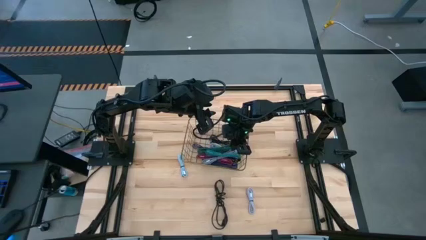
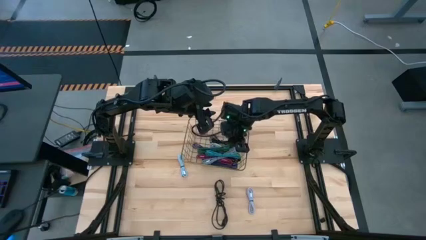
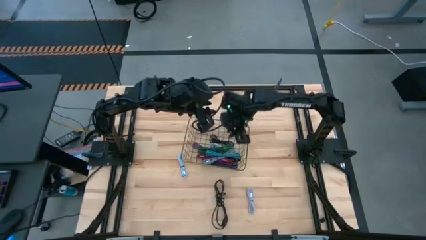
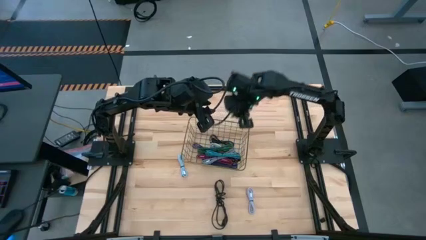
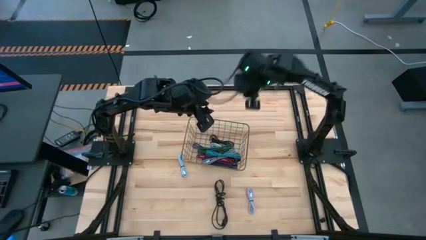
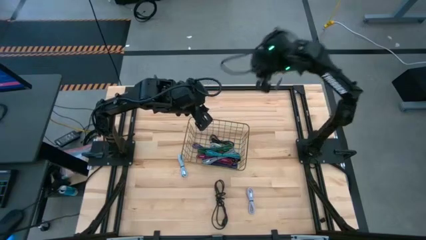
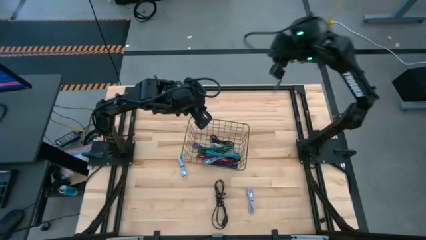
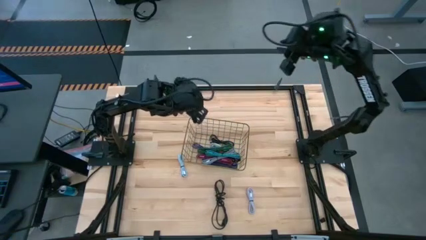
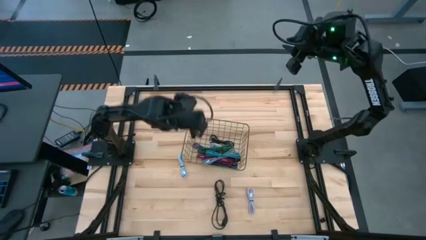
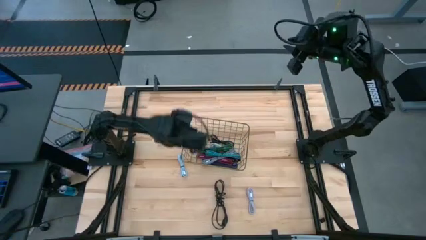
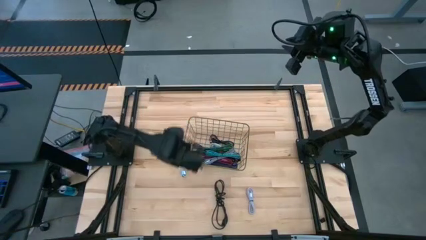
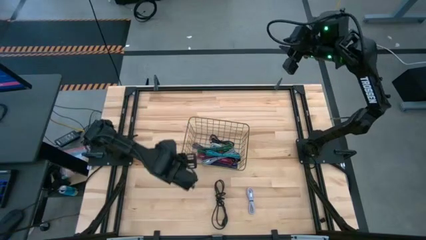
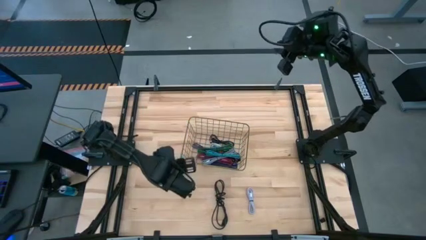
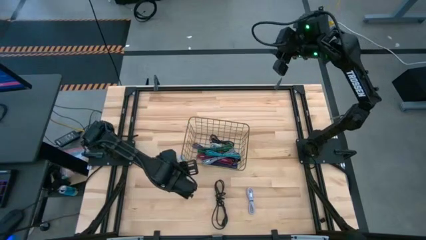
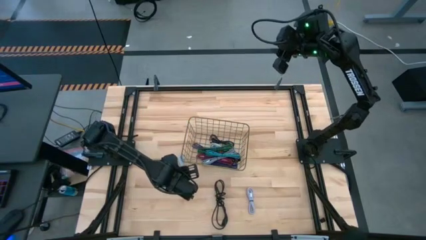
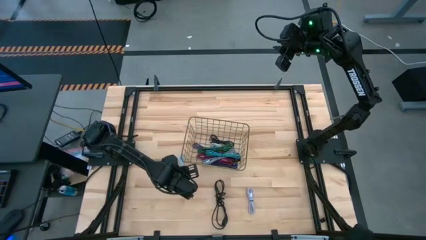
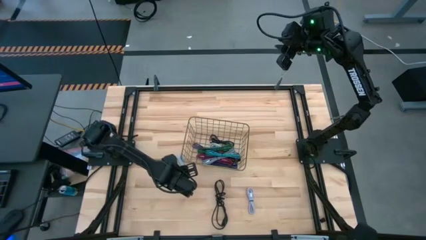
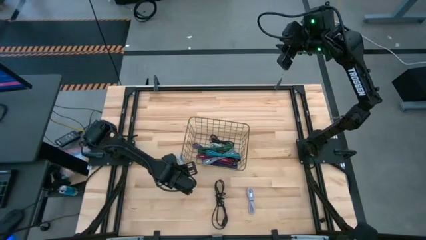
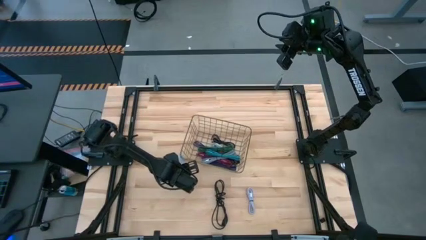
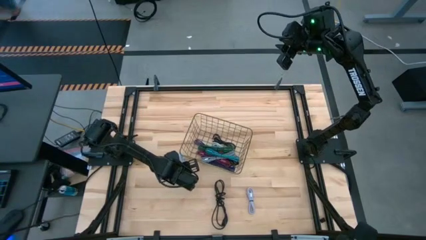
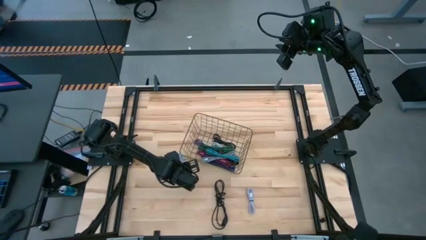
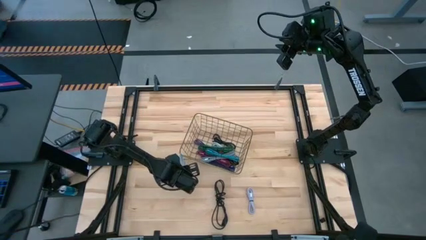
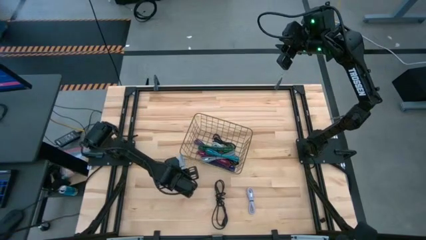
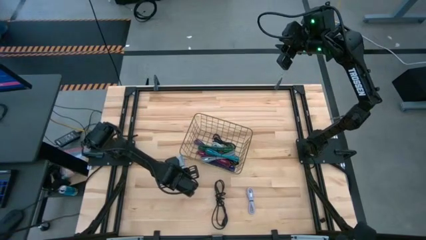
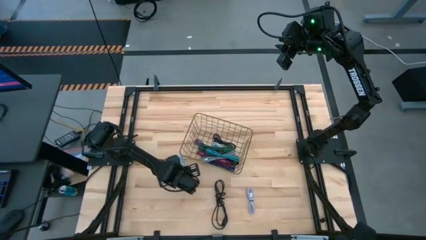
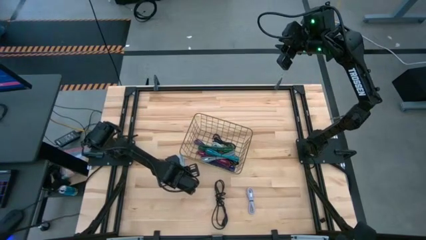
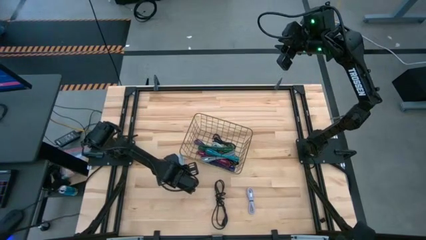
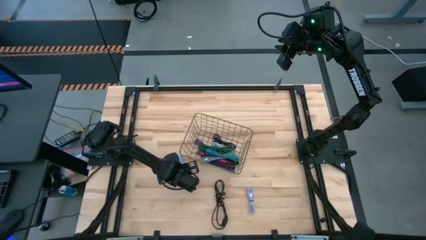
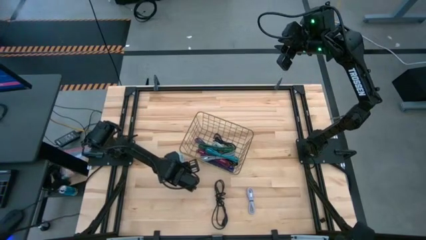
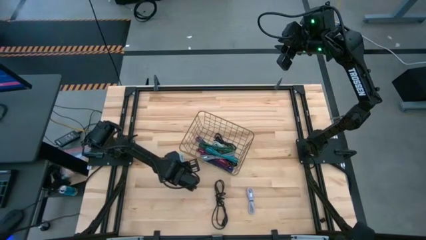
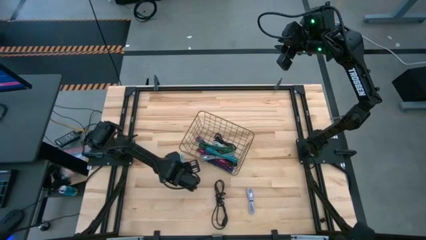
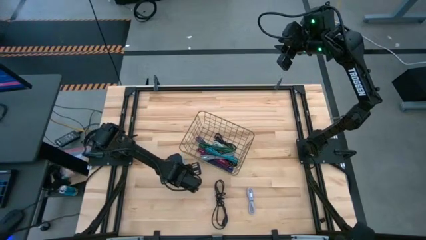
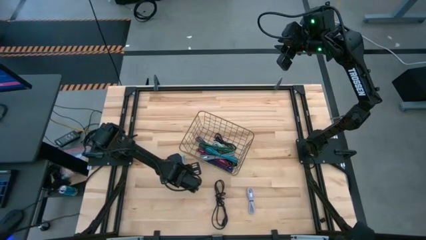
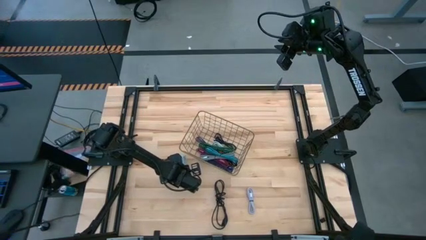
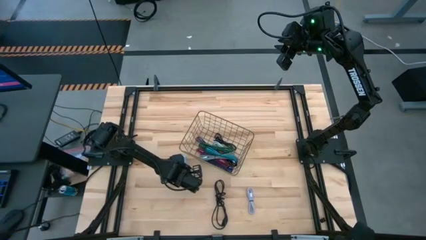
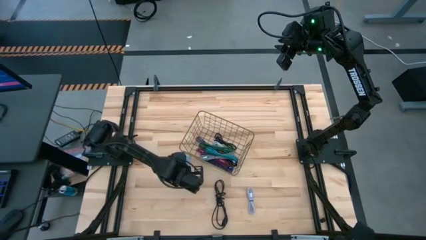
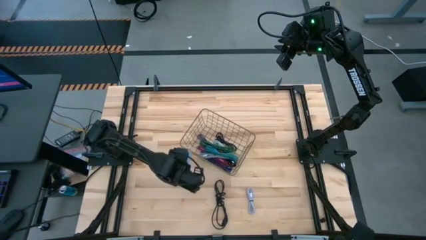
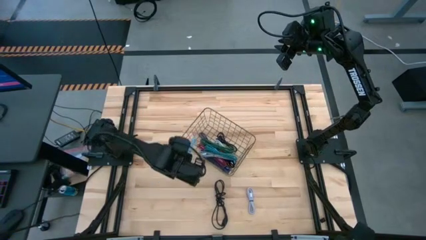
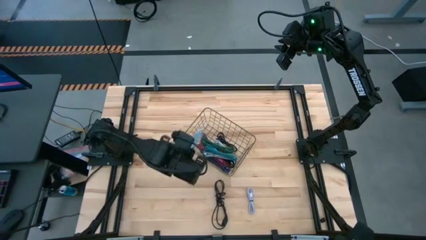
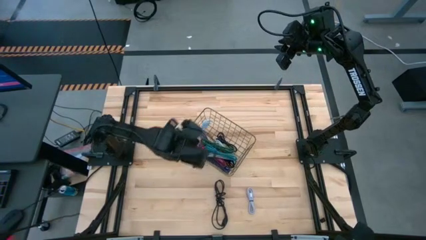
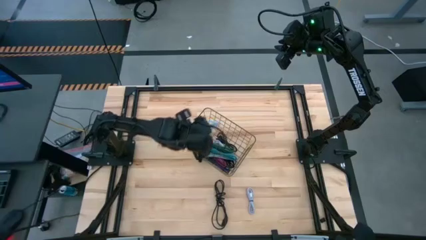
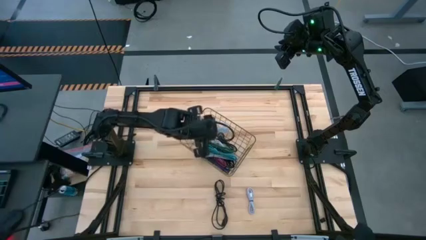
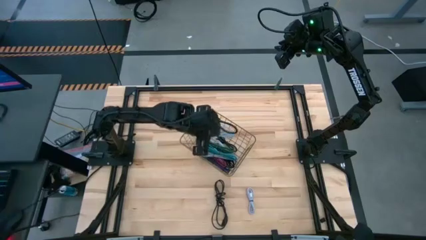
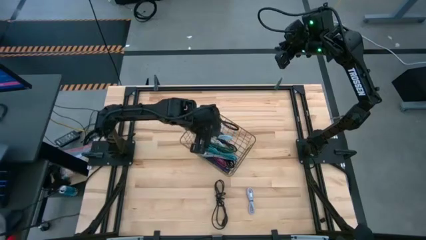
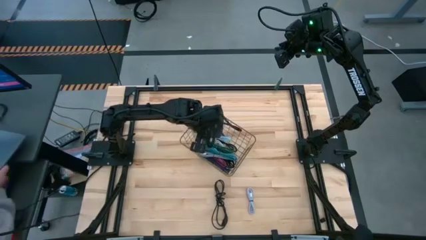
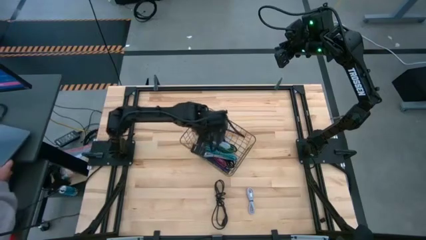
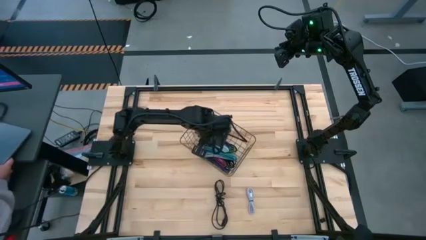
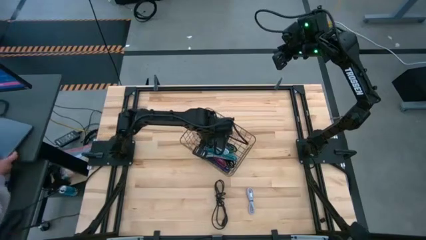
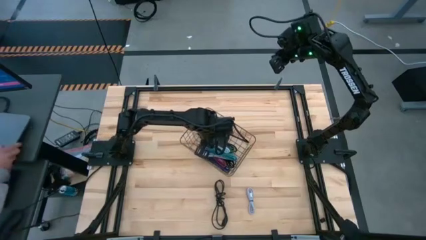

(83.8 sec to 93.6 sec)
Task: Pick and place USB-C Cables
Put the light blue USB cable into the gold wire basket

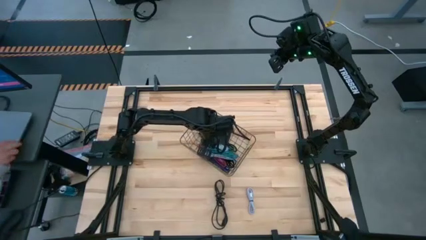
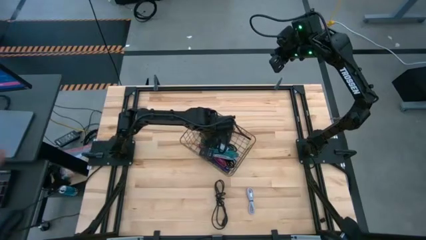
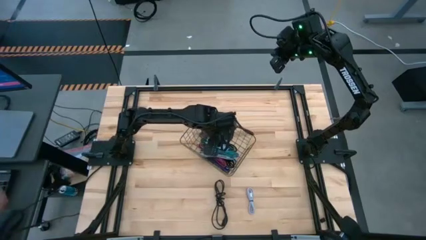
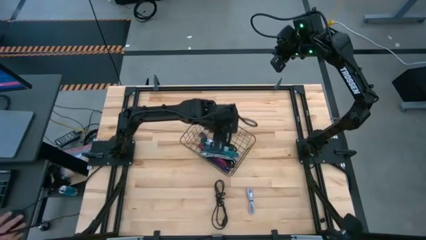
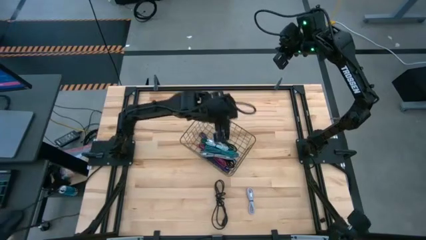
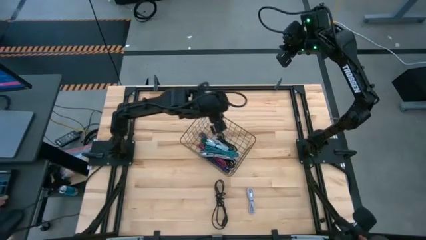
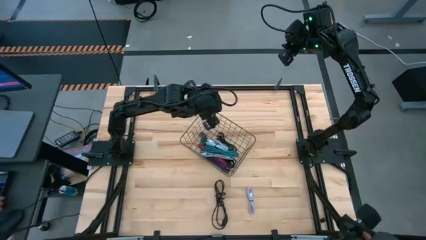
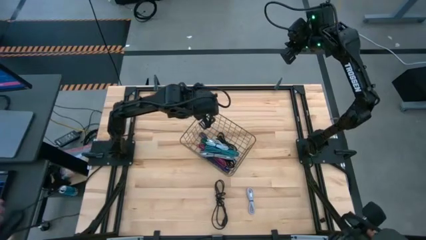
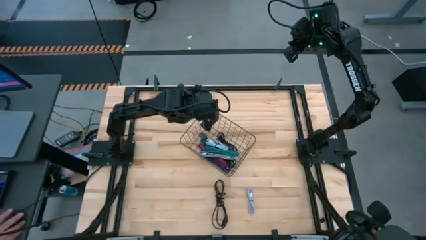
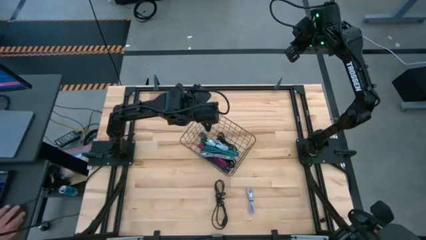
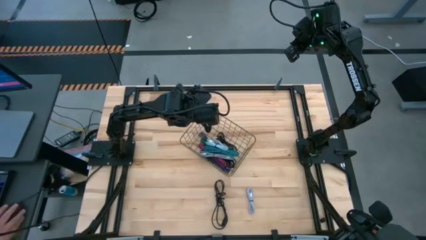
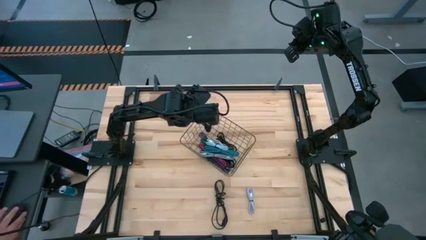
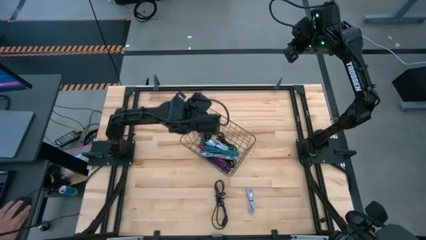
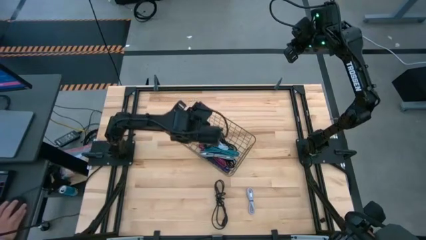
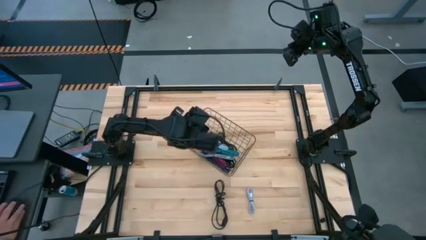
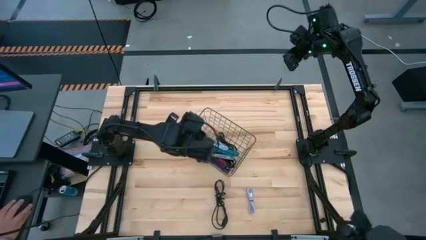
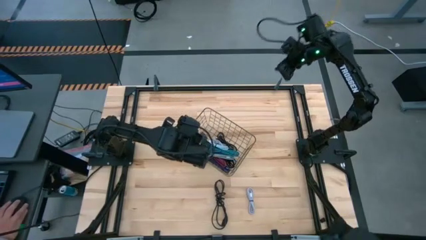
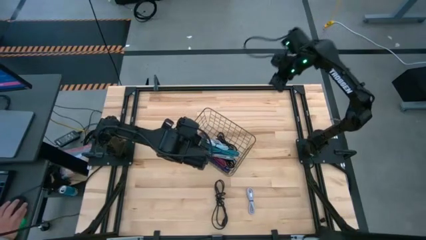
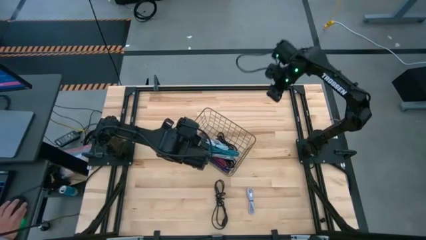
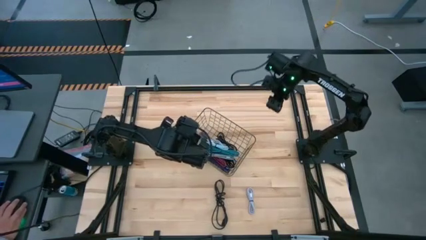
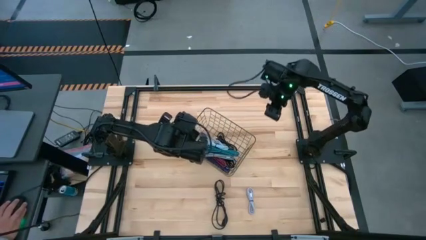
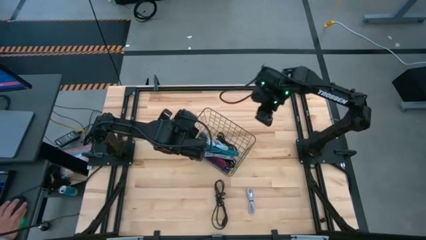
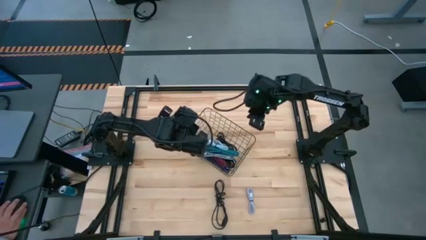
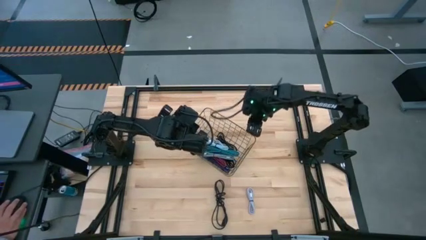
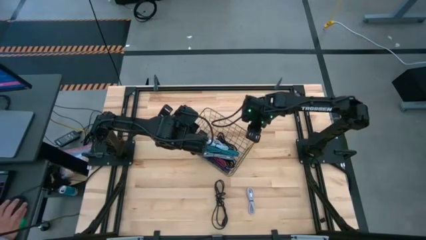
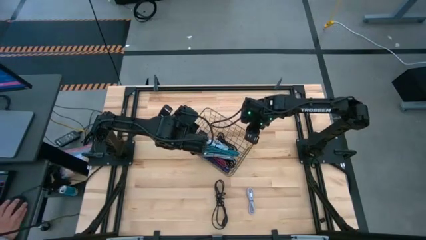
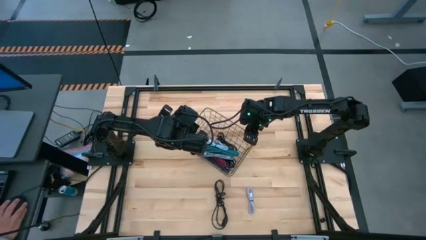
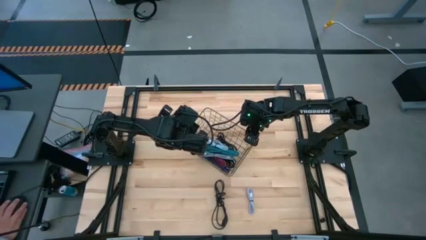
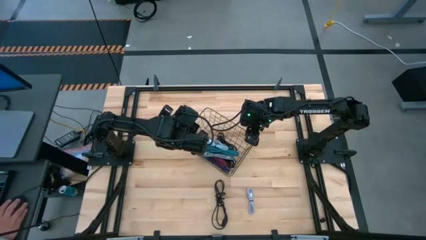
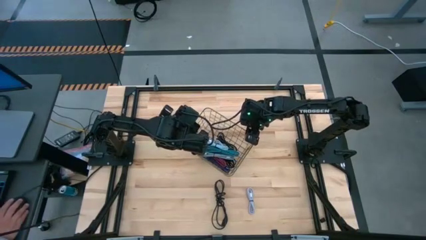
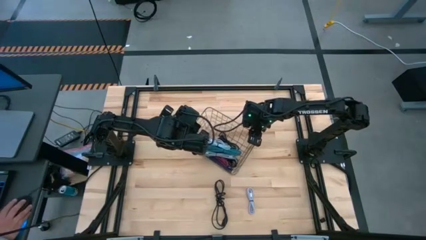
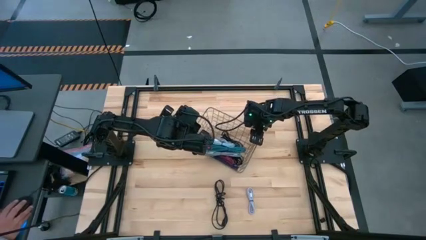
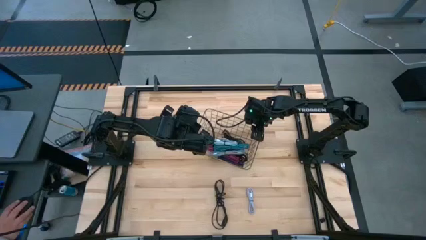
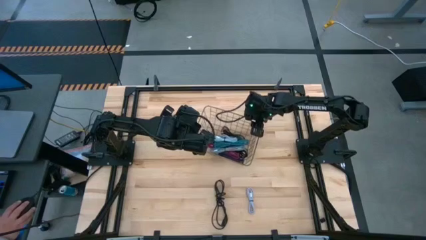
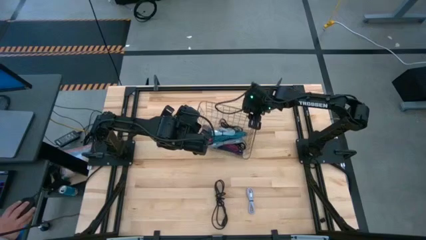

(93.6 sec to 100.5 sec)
Adjust the gold wire basket
